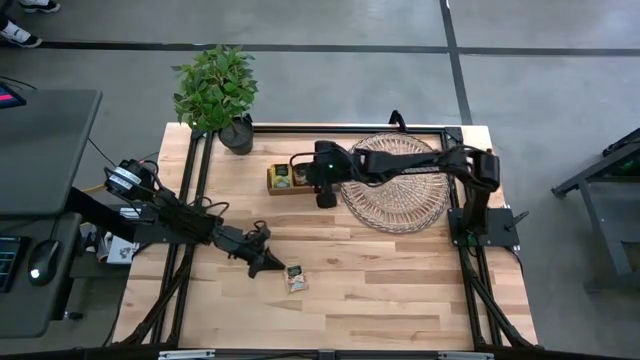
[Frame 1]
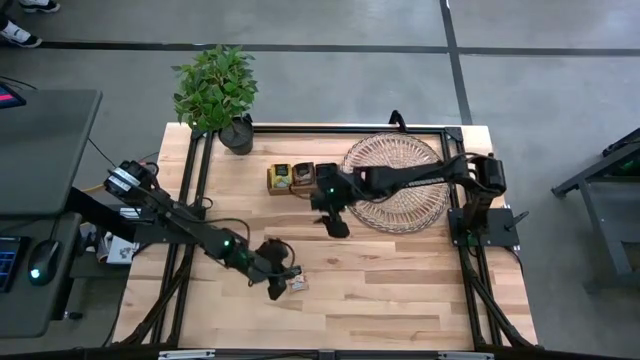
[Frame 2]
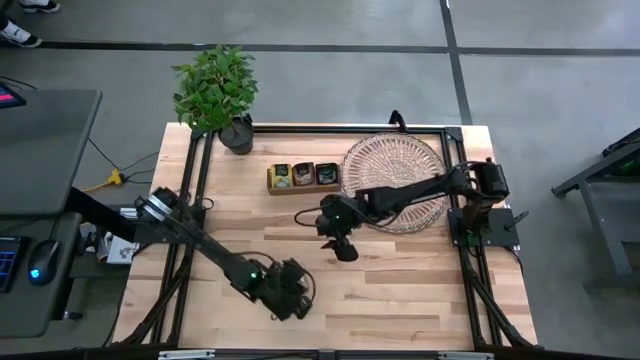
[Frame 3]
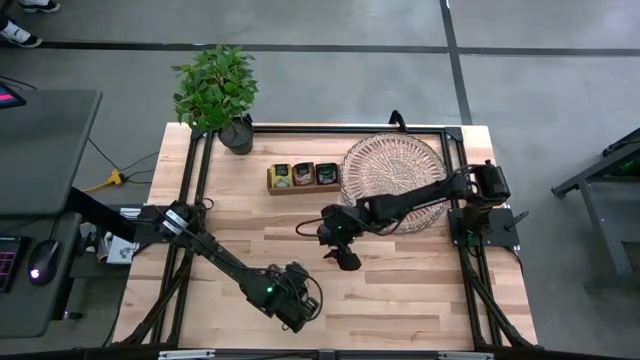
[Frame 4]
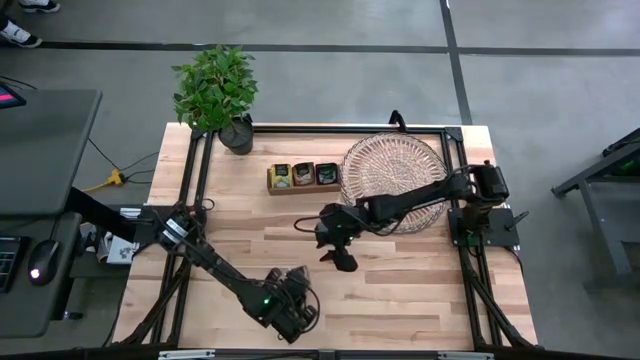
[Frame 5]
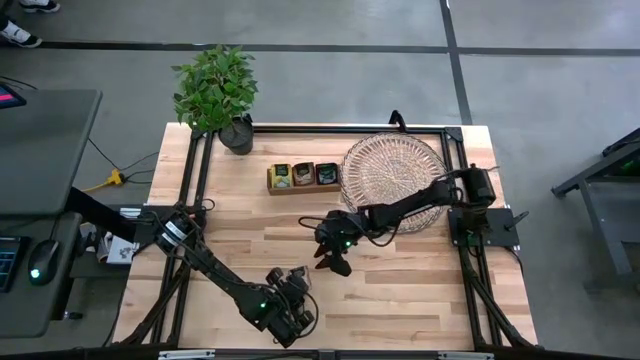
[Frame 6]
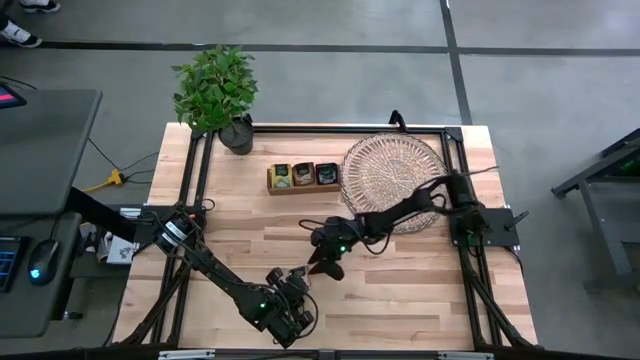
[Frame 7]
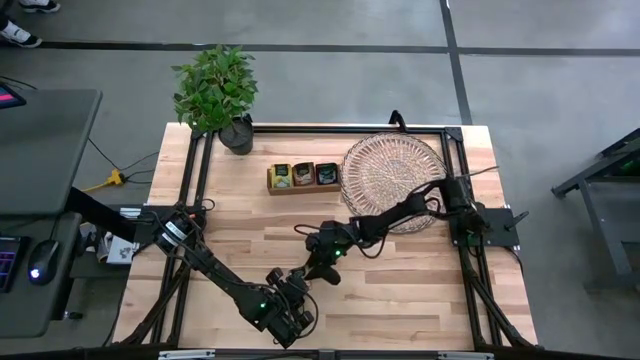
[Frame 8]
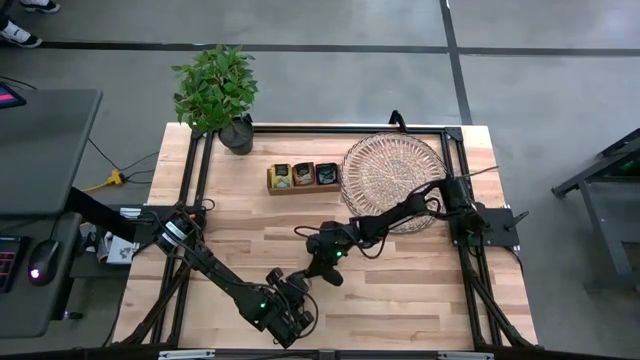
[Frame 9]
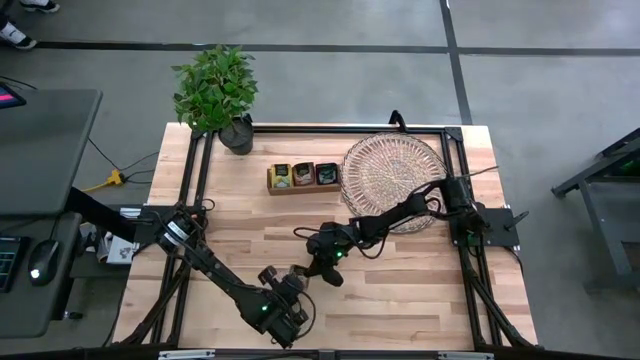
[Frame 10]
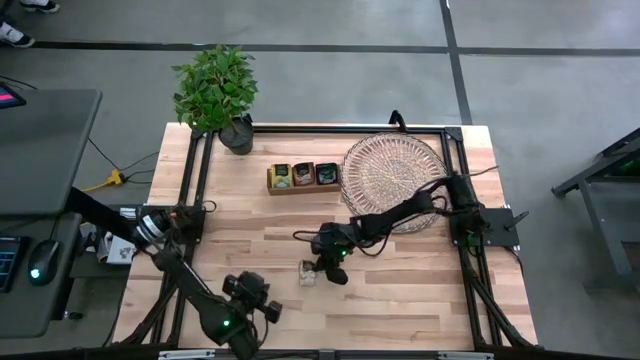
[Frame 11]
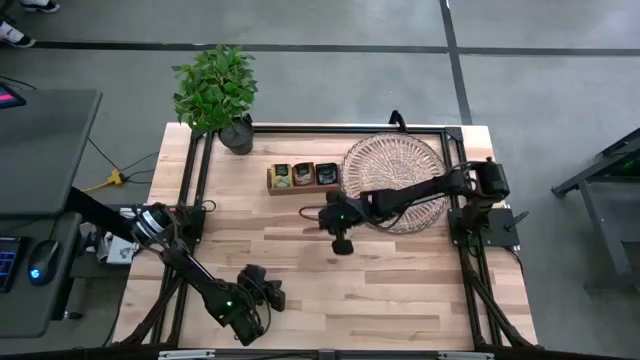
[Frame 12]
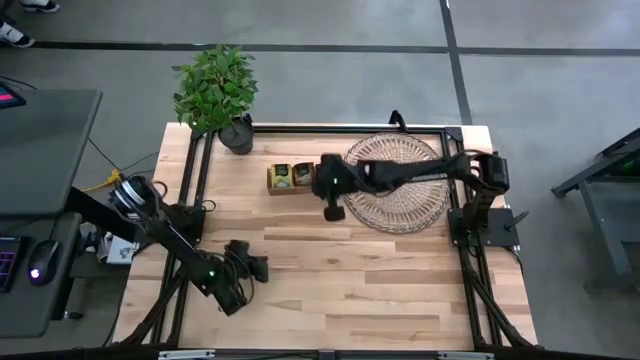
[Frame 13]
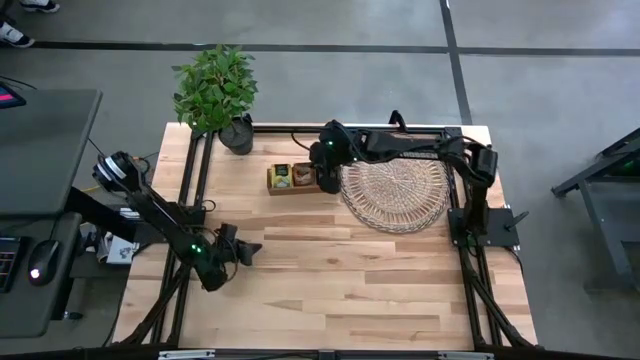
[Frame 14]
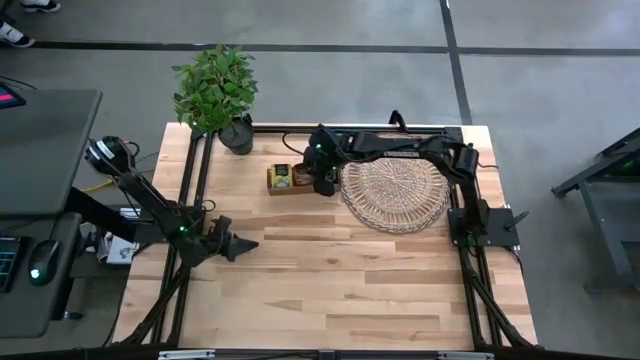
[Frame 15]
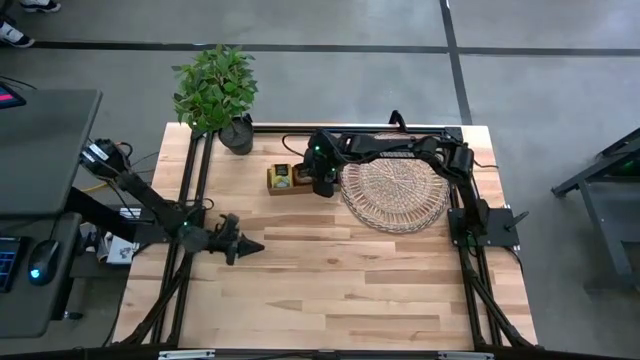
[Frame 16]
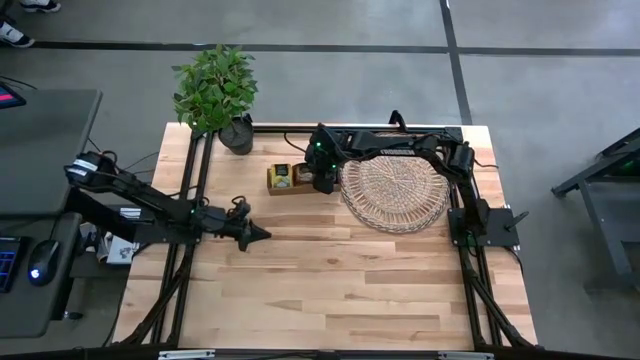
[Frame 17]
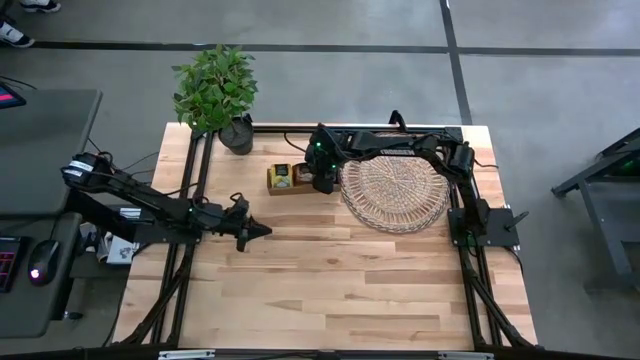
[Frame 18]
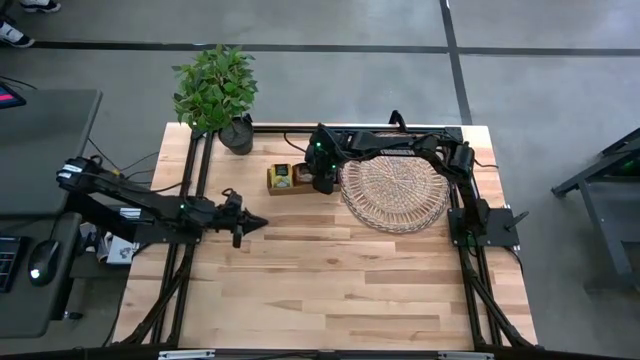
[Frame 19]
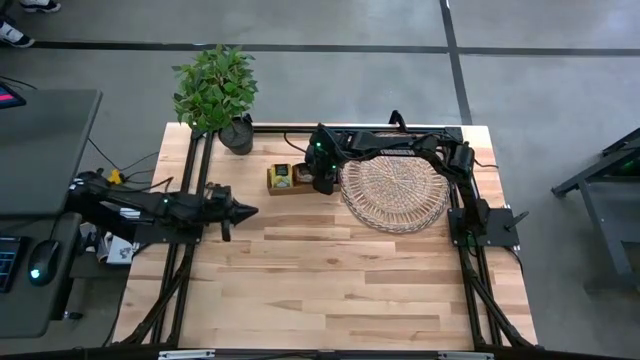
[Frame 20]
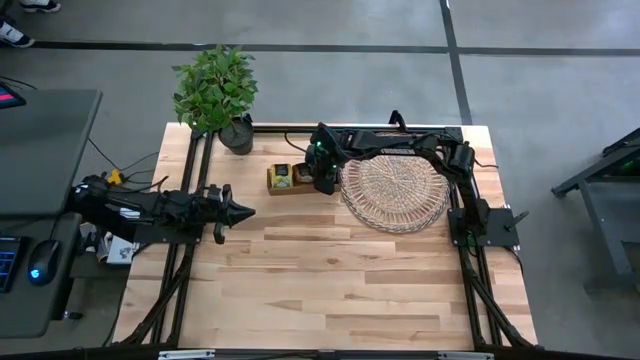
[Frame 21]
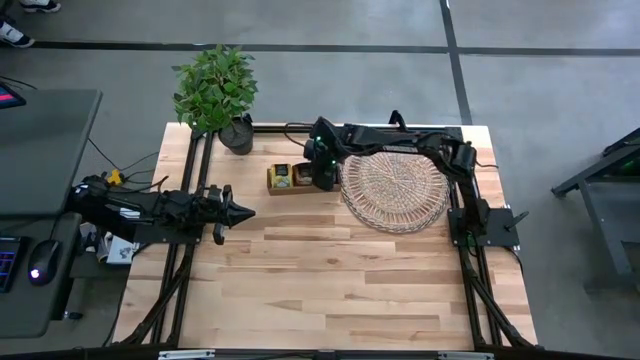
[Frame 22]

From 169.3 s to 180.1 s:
Task: Pick & Place Tea
Put the brown tea bag into the middle section of the wooden organizer

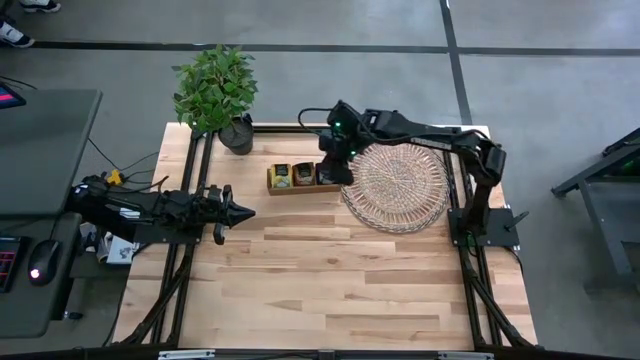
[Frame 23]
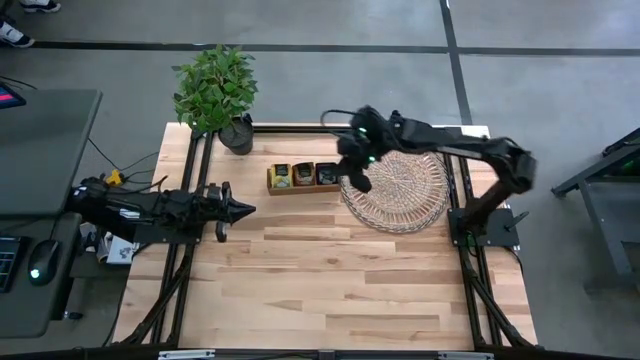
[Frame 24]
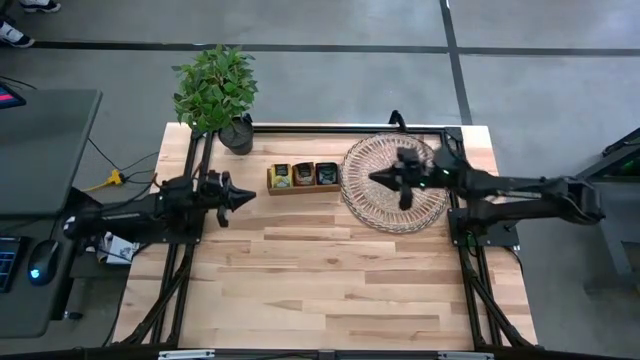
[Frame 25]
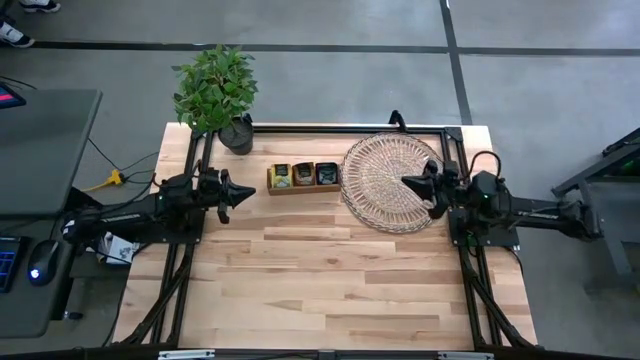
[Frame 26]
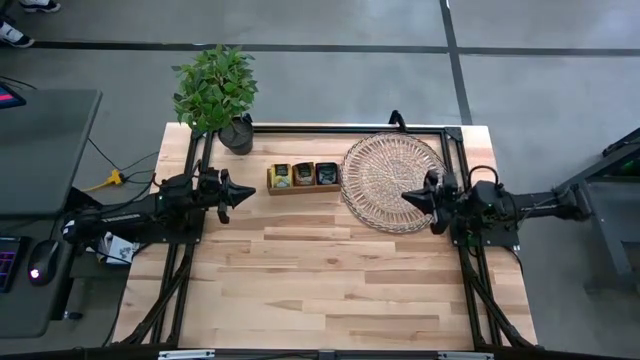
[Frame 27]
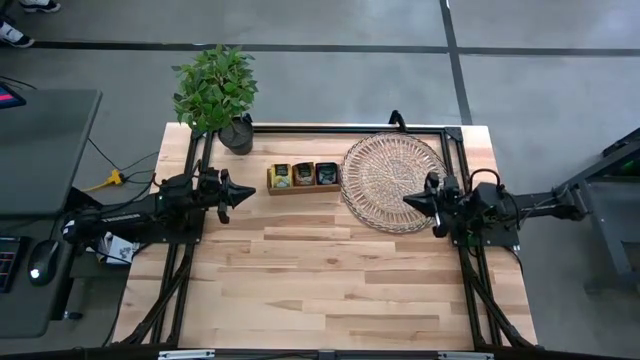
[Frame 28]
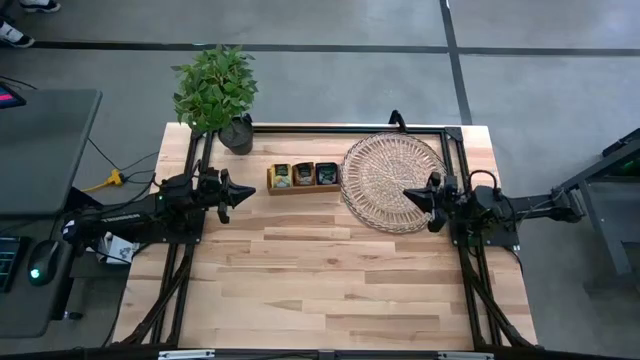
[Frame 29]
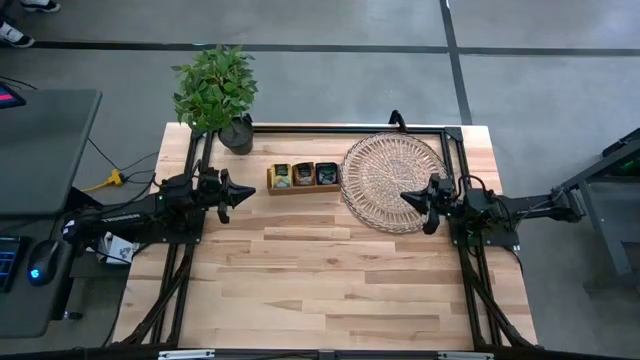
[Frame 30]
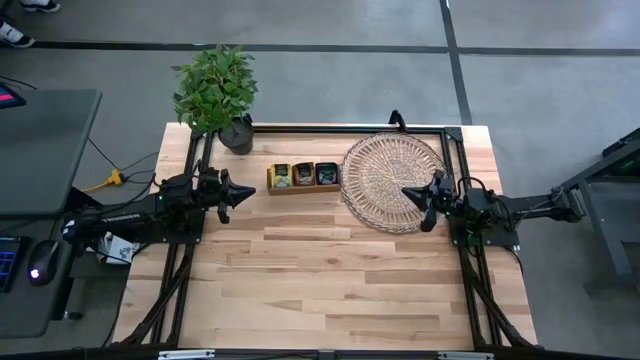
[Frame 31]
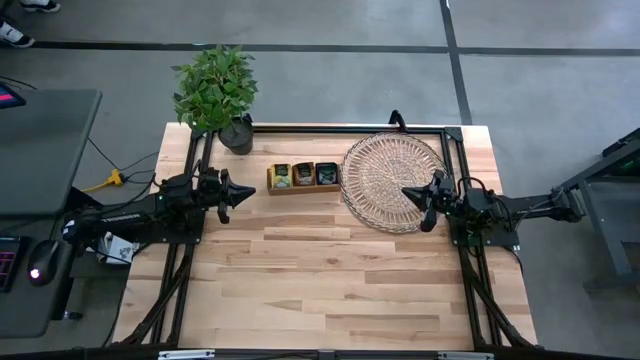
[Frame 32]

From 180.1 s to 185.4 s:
Return to Home Position

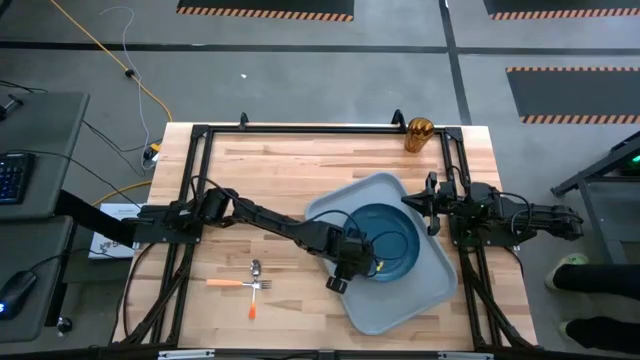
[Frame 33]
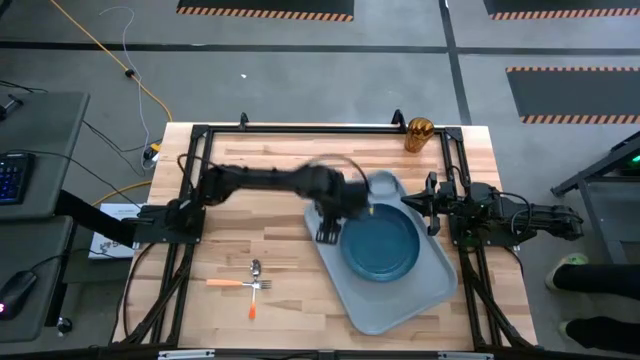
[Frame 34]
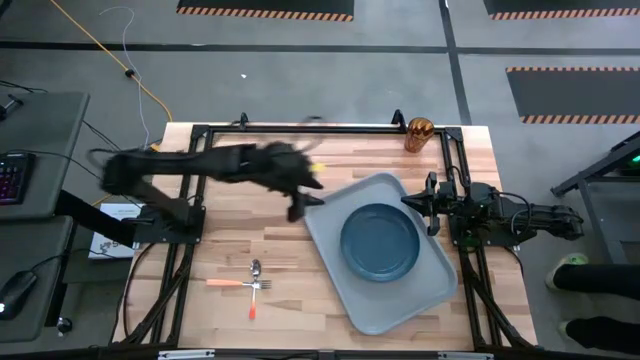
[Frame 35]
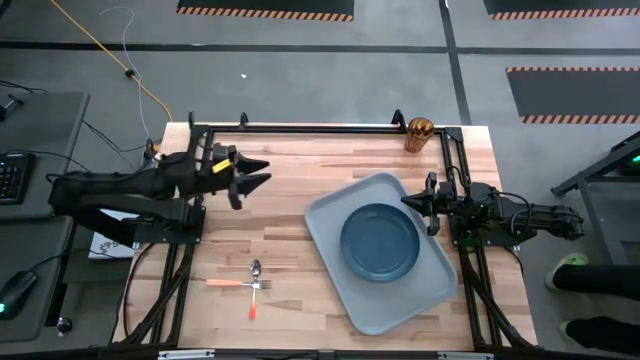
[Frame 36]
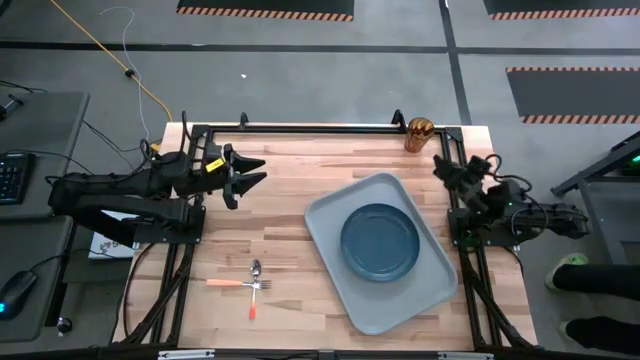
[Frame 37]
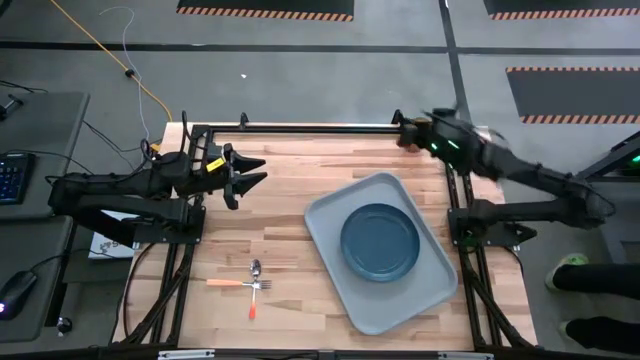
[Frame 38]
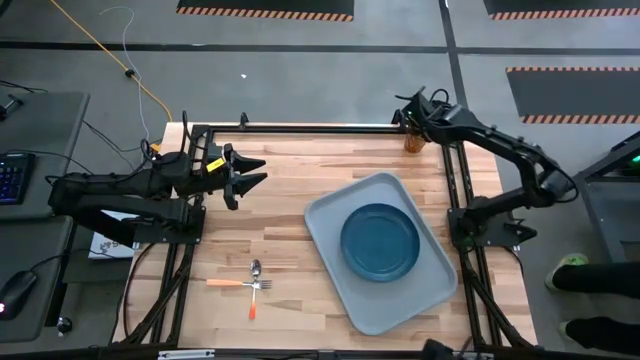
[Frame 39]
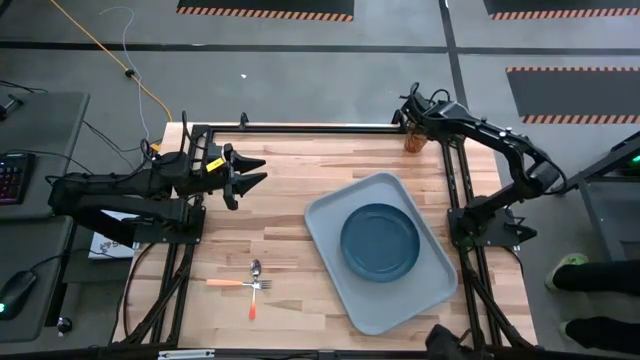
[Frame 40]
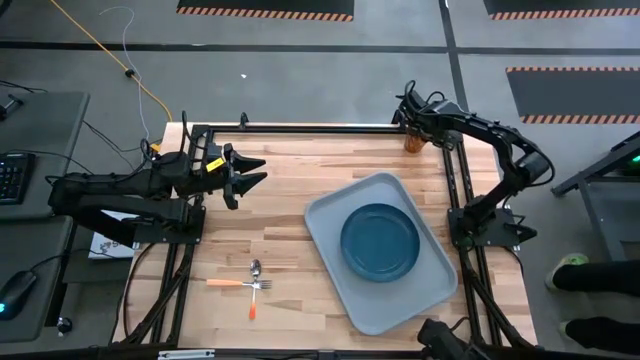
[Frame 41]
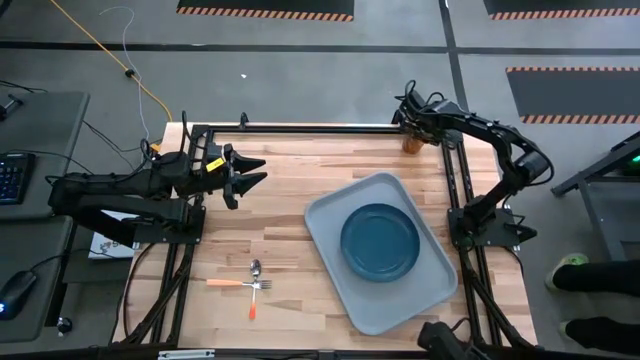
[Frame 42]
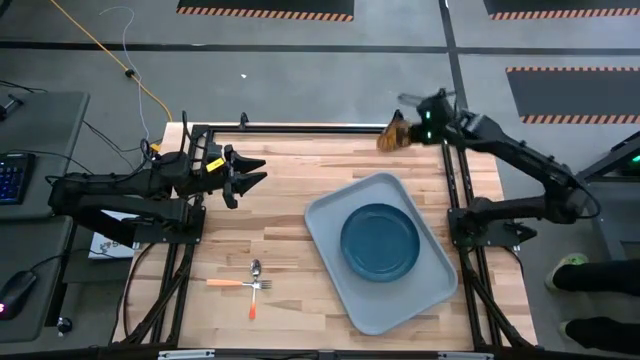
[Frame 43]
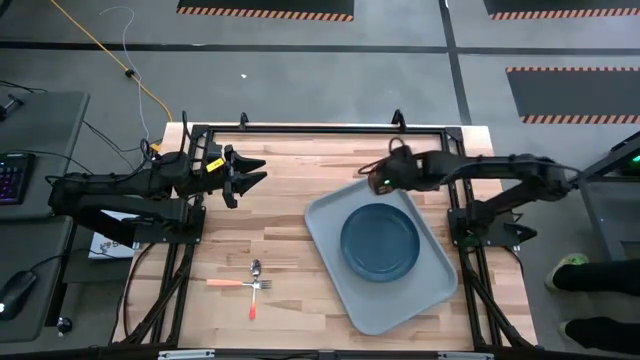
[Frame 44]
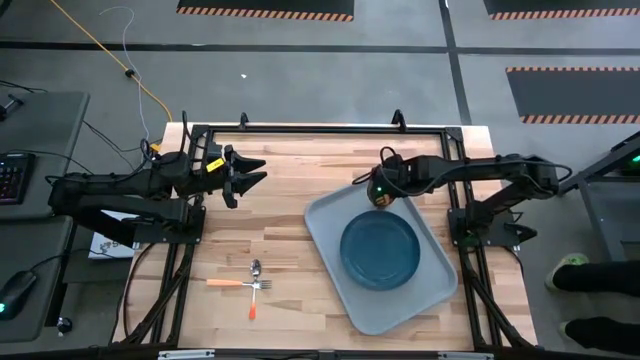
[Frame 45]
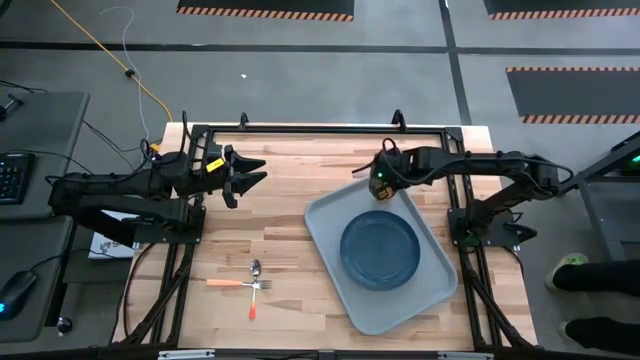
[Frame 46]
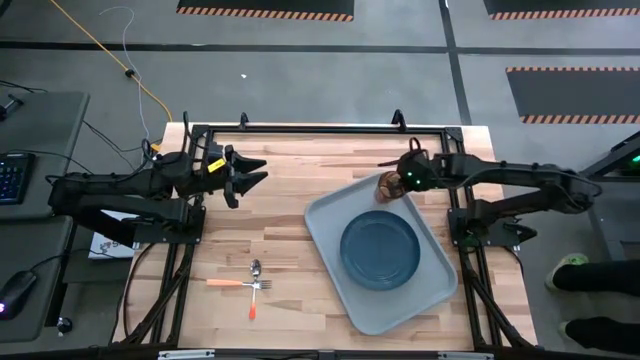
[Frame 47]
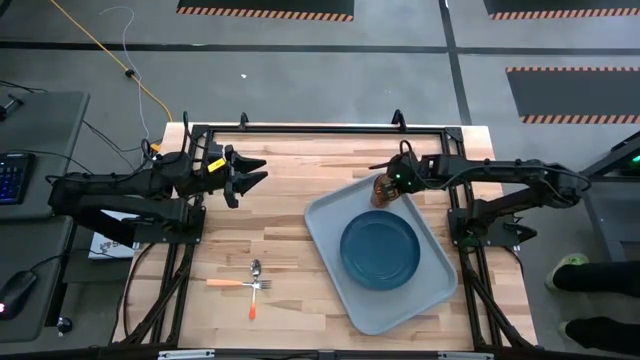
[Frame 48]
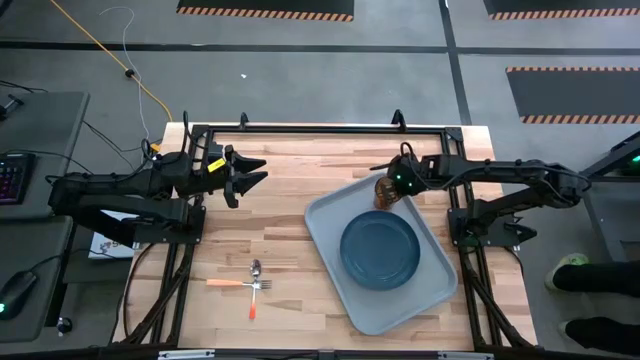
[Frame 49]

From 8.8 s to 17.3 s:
Task: Pick and place plate/cup/fork/spoon on tray
Put the brown glass on the gray serving tray to the top left of the blue plate
